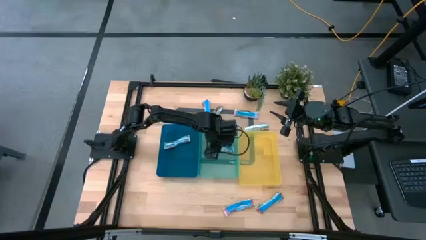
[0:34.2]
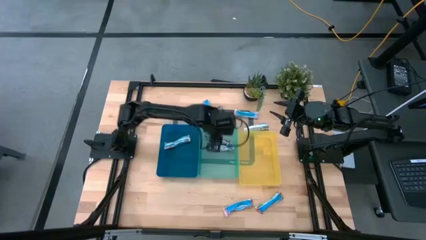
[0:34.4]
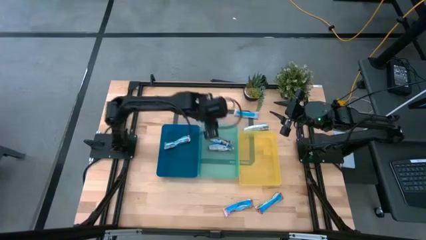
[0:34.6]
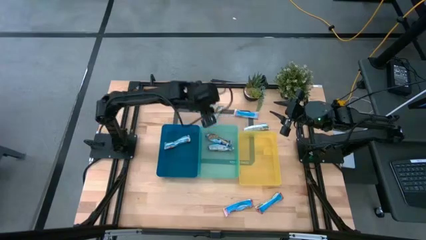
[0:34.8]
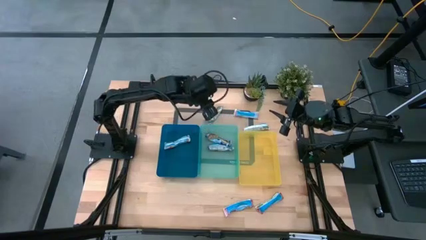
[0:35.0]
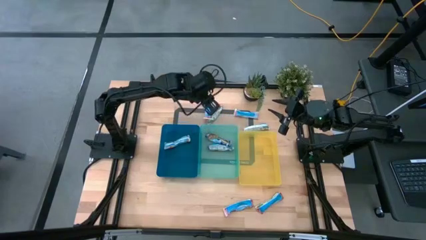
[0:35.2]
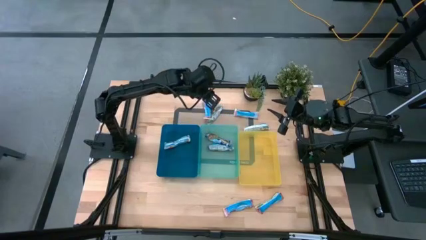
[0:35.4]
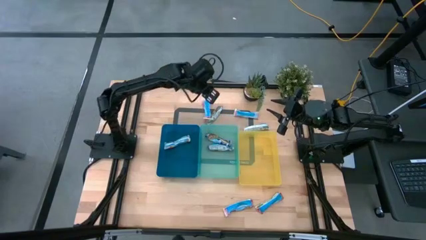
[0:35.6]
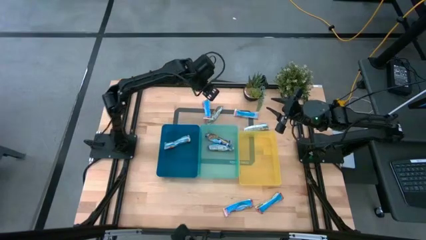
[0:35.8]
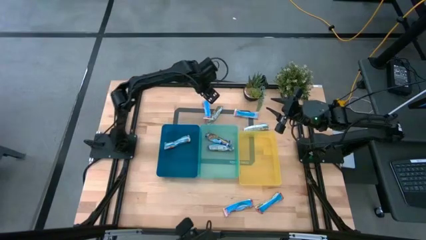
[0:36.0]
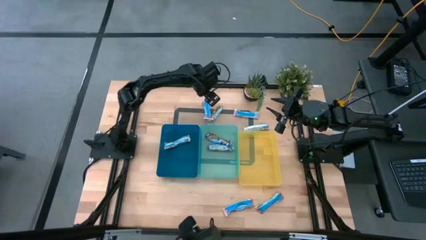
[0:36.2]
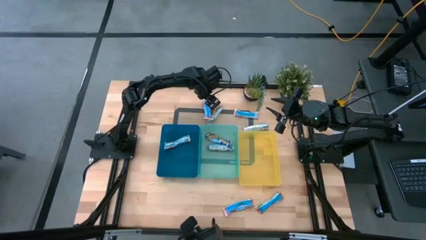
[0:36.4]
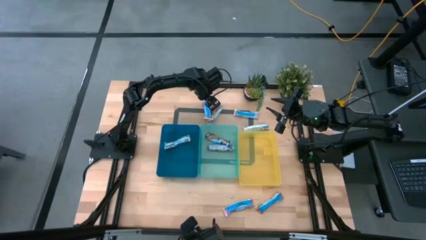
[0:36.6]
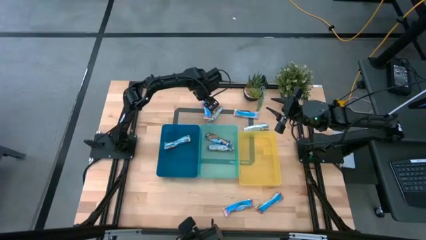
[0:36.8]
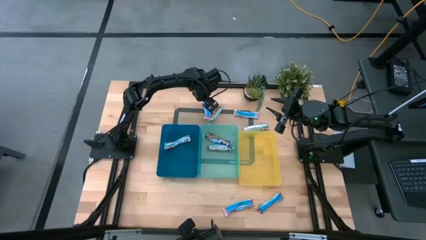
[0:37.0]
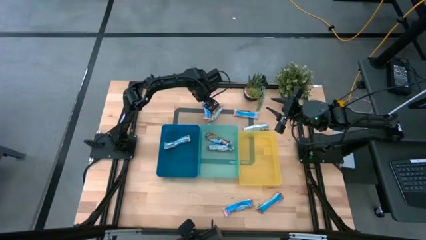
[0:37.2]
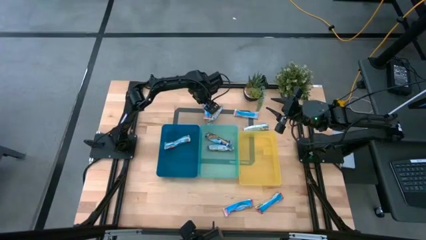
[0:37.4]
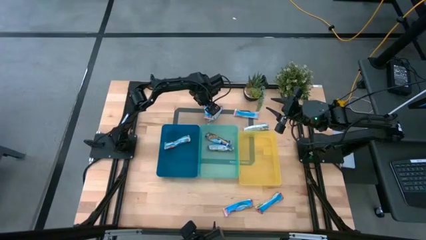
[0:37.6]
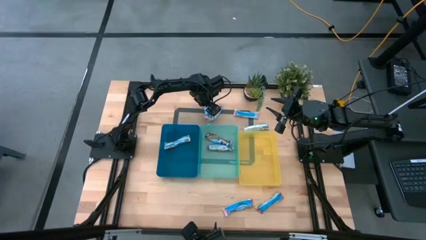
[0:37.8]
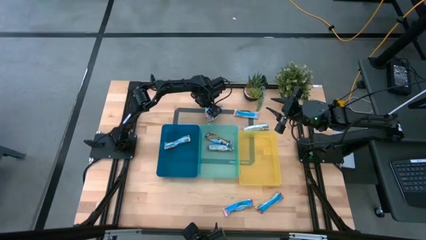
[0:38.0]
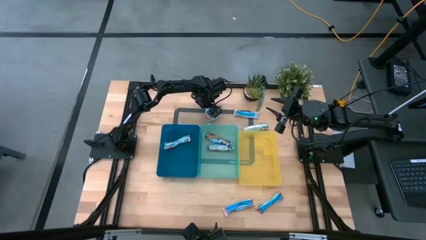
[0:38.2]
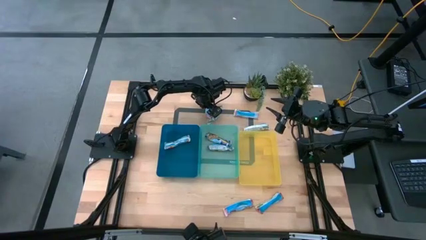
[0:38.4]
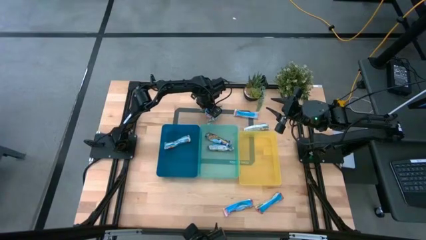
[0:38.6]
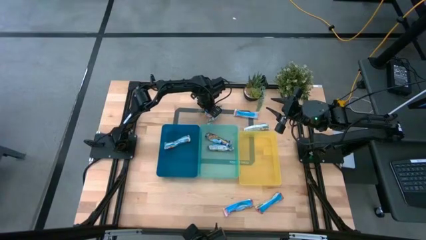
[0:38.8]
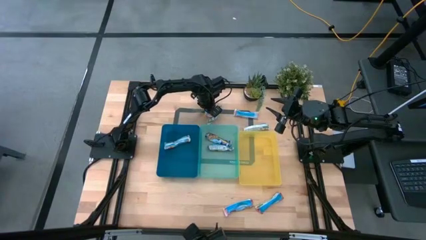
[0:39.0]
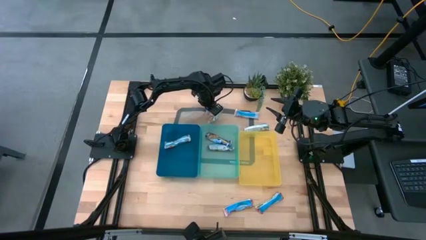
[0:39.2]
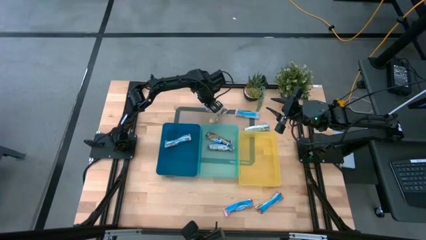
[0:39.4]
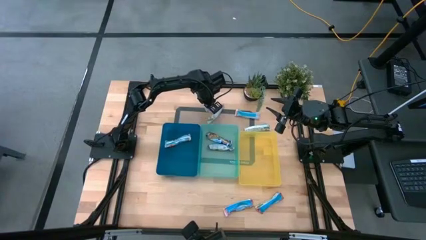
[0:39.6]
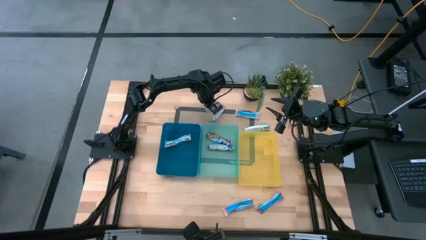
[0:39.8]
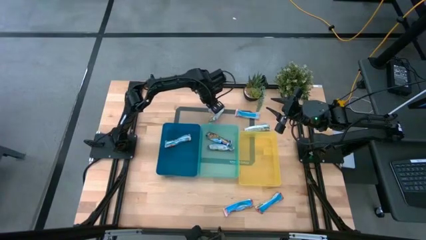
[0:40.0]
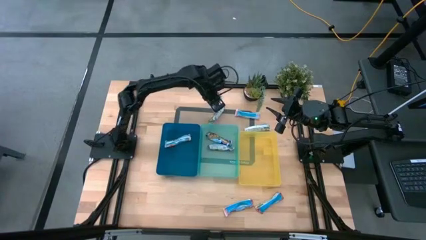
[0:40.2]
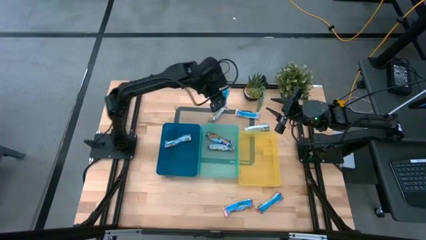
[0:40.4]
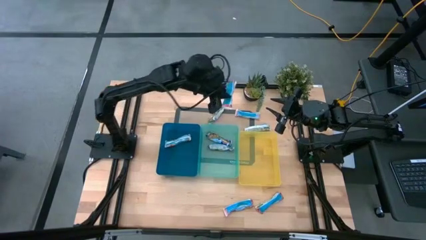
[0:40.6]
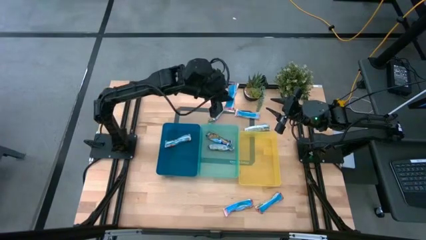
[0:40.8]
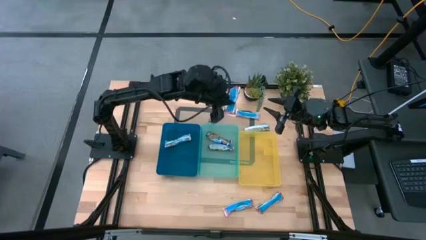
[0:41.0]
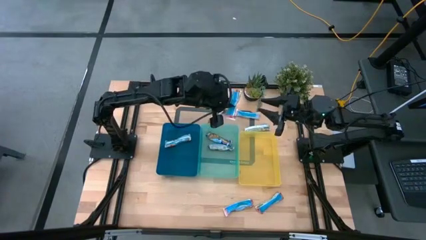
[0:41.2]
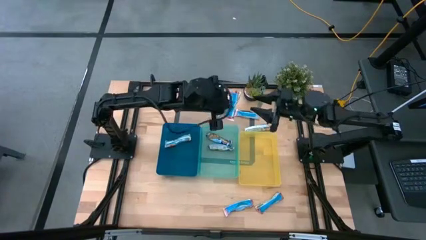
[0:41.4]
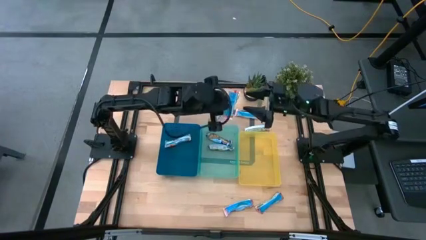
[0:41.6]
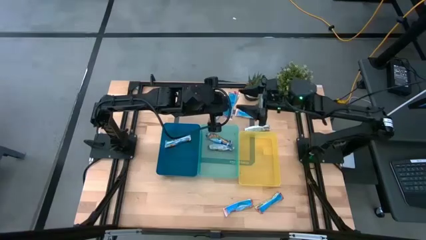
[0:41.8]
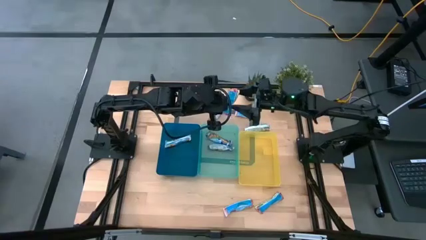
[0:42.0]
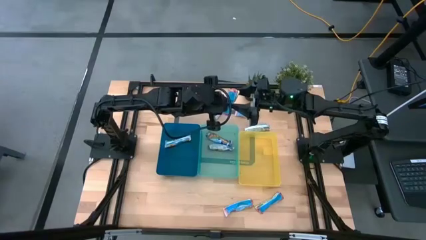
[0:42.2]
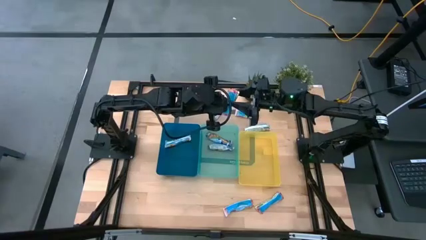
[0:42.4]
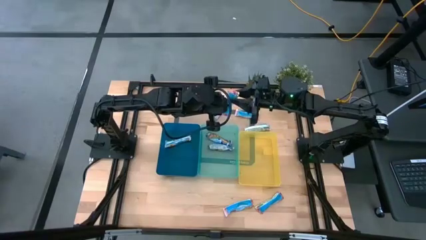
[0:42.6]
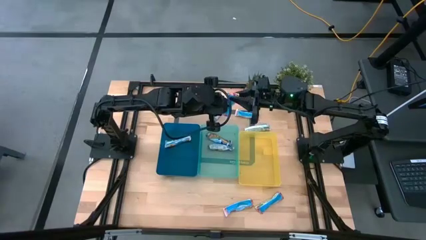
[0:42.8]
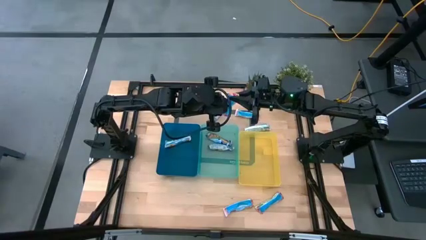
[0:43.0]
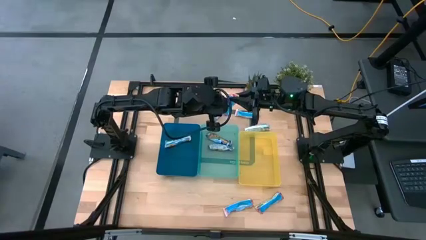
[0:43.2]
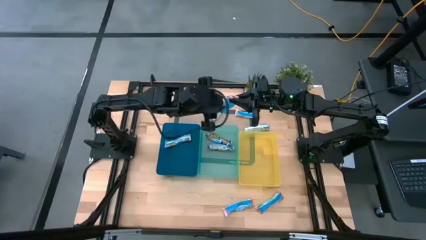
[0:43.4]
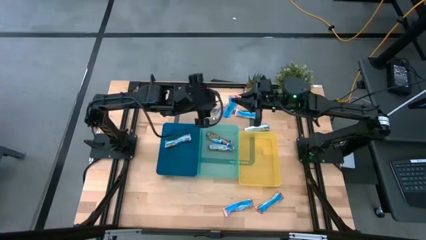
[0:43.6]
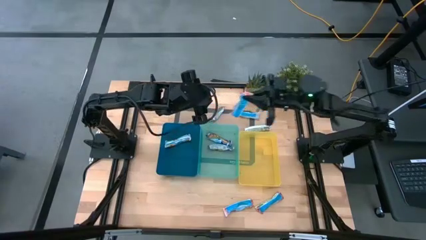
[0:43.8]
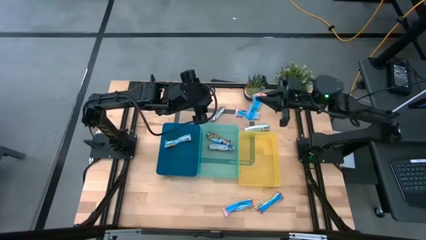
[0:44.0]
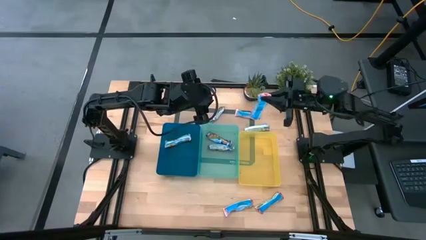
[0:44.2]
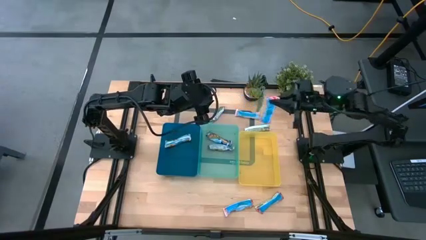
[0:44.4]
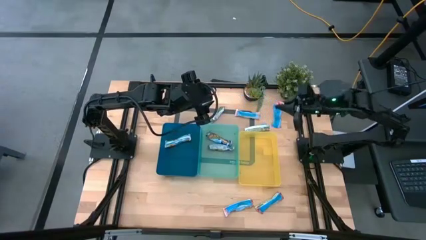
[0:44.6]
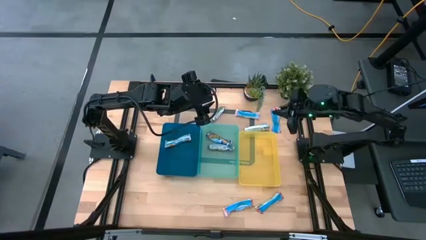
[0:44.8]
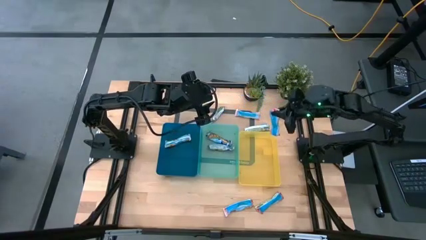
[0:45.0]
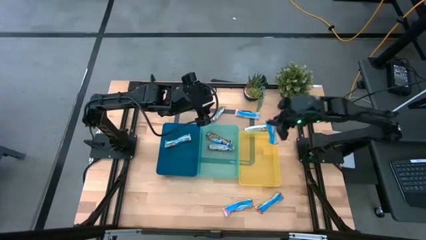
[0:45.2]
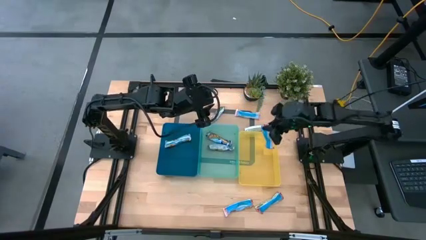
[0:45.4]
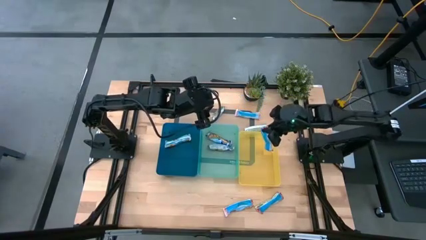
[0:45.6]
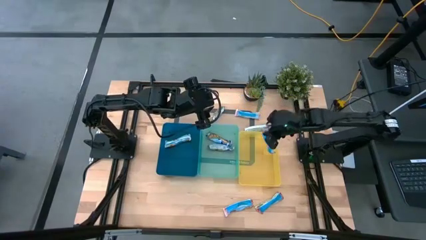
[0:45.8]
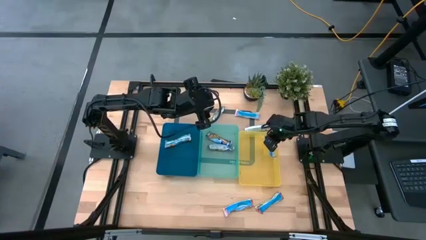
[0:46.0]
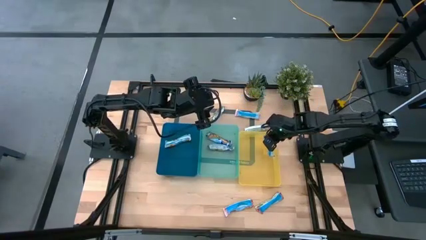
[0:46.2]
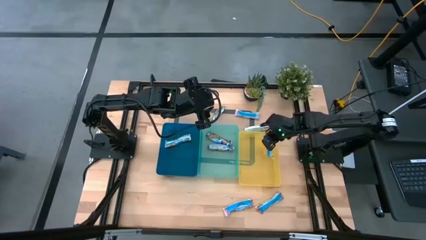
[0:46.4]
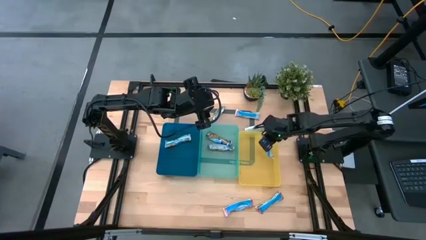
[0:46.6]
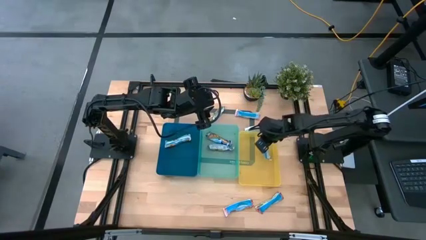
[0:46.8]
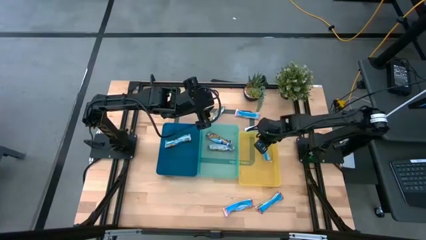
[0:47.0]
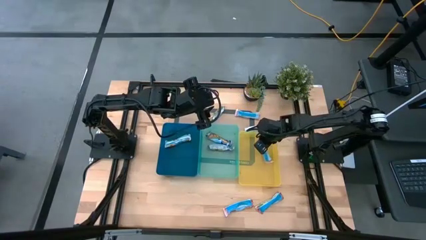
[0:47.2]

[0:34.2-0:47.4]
Task: Pick and place Granola Bars by type
Put the red granola bar into the yellow bin

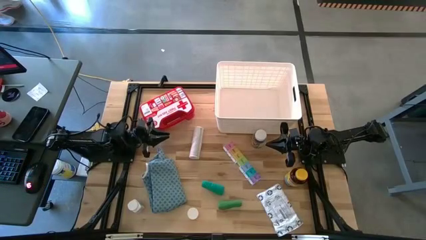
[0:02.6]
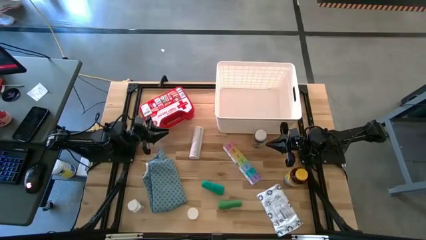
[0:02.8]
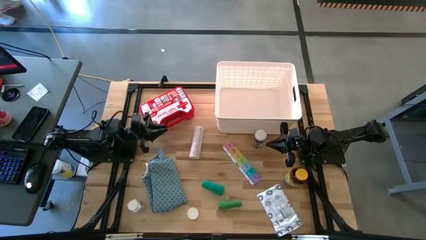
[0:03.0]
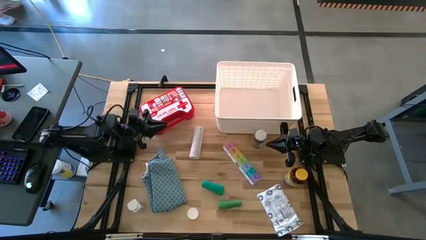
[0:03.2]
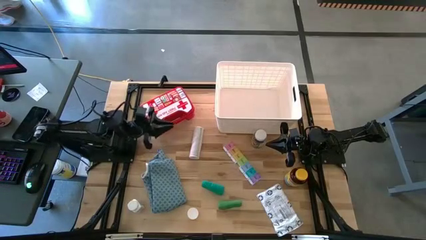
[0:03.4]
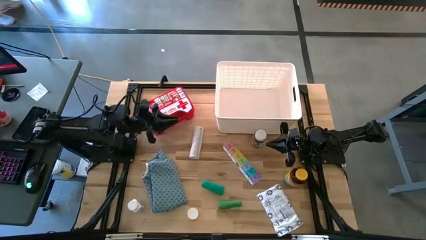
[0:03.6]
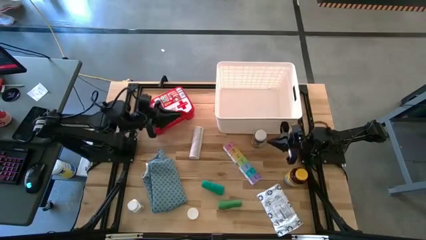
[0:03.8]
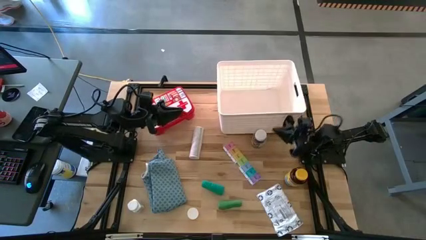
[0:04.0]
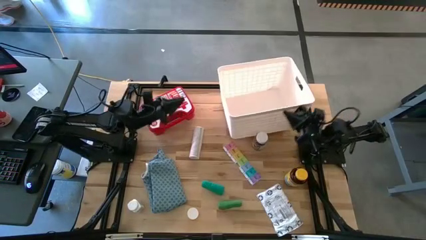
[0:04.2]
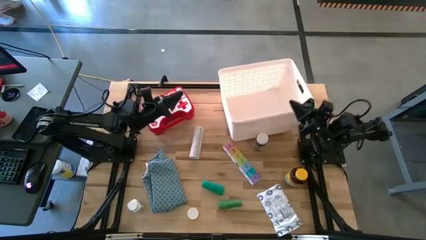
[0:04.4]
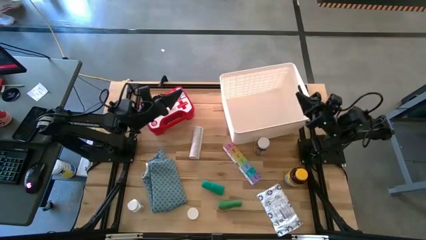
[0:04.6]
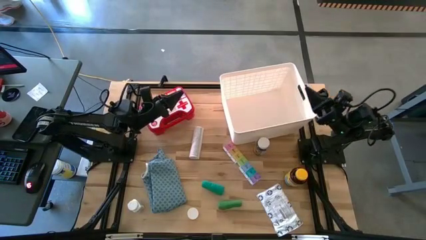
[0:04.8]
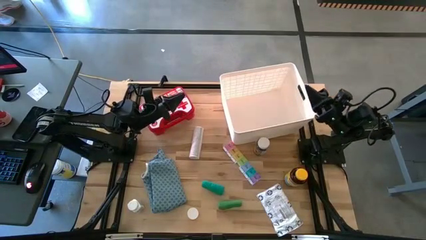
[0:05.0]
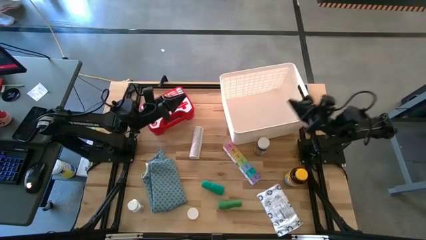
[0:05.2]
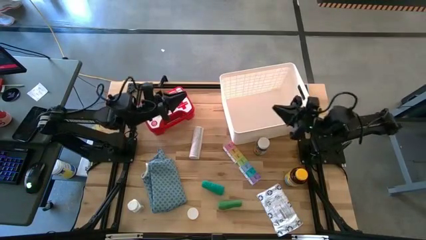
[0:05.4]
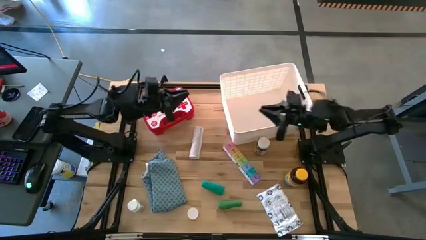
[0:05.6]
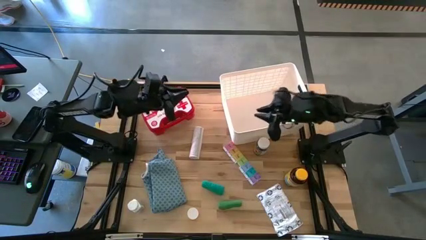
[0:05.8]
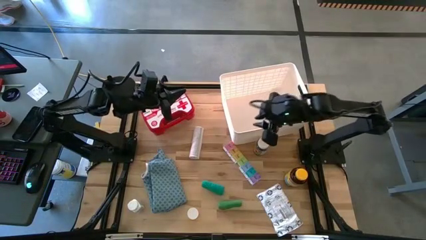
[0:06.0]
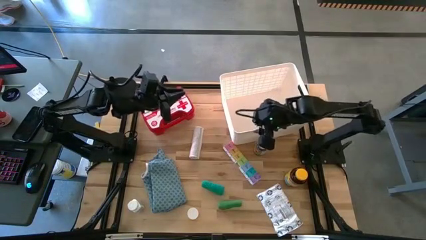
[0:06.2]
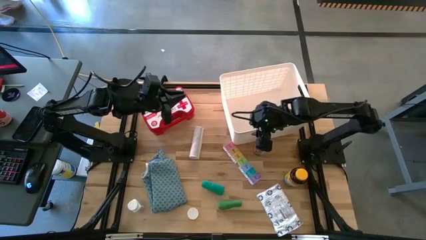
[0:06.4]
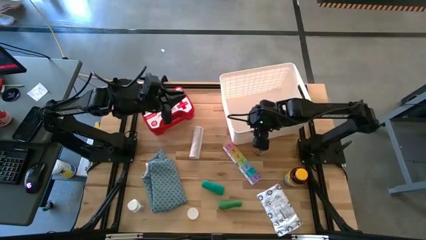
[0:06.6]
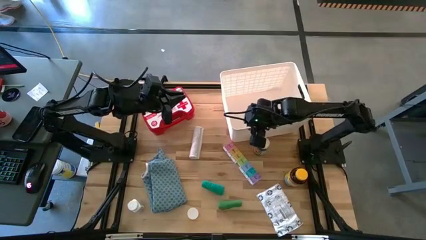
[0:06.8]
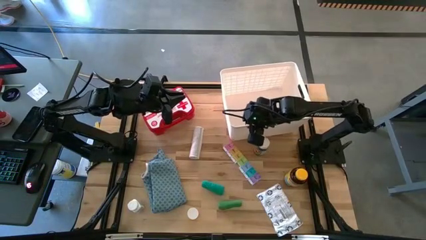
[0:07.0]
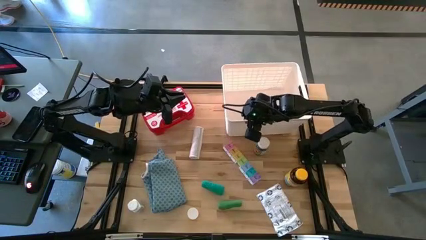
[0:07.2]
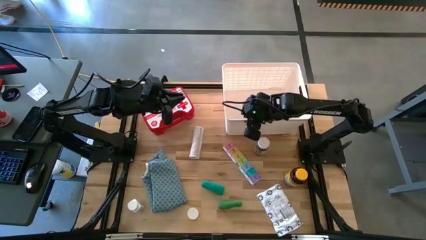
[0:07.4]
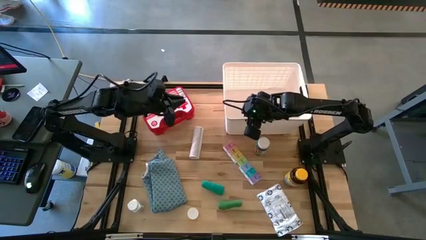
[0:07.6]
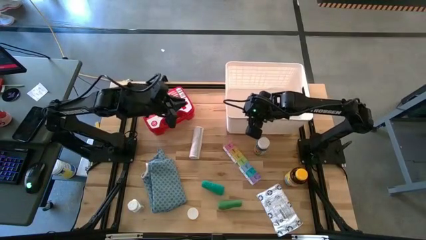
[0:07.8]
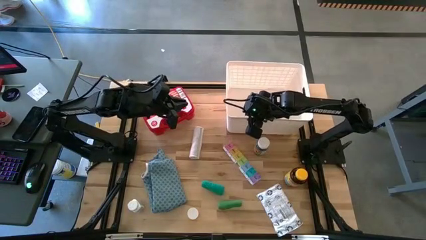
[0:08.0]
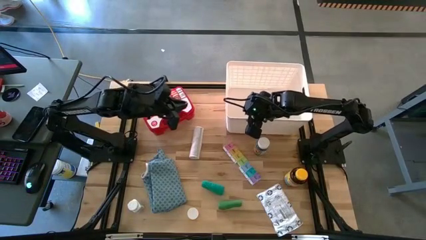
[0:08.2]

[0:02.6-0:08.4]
Task: Pick & place medical supplies in basket/bin
Adjust the white bin
